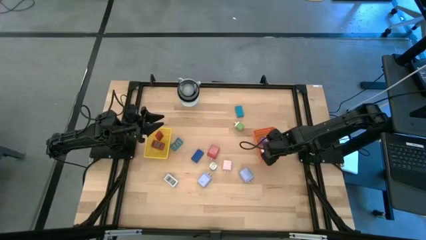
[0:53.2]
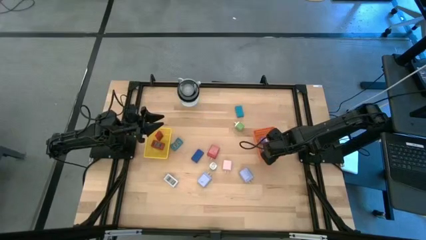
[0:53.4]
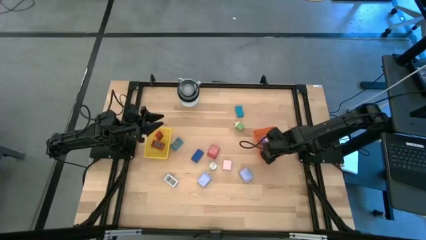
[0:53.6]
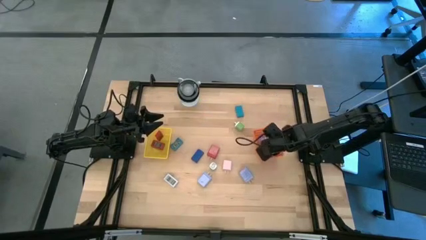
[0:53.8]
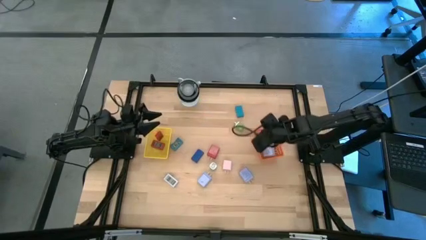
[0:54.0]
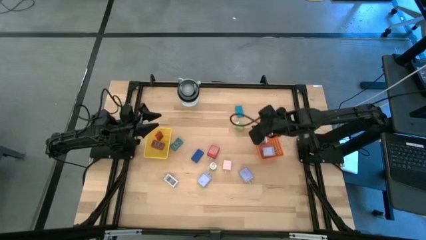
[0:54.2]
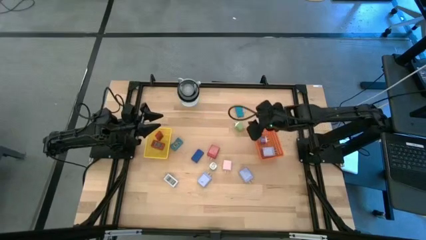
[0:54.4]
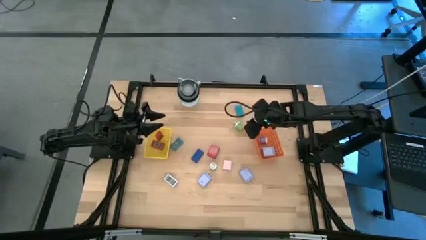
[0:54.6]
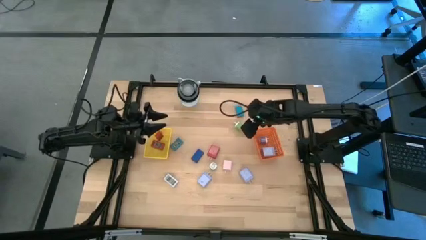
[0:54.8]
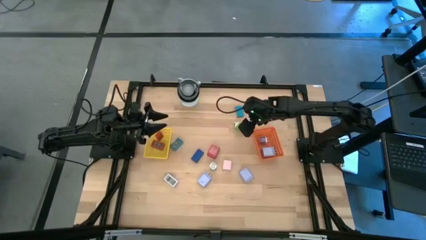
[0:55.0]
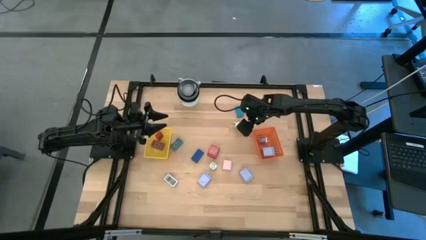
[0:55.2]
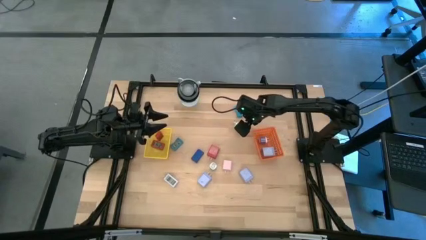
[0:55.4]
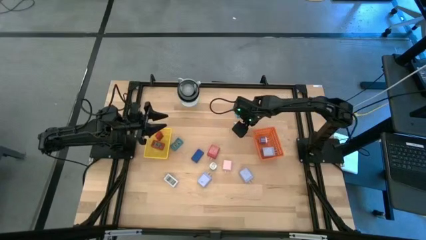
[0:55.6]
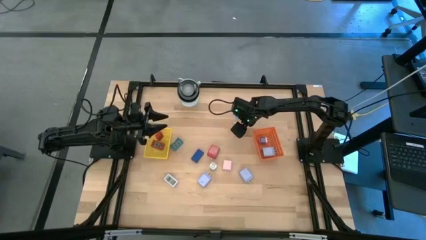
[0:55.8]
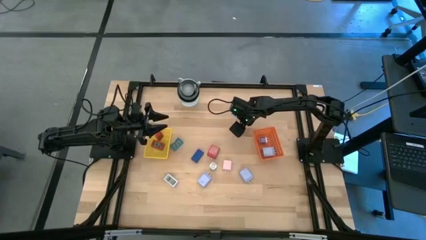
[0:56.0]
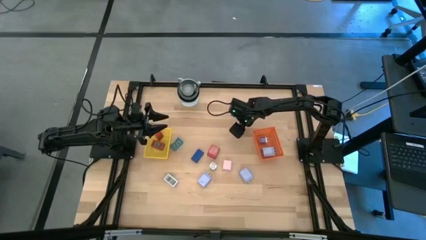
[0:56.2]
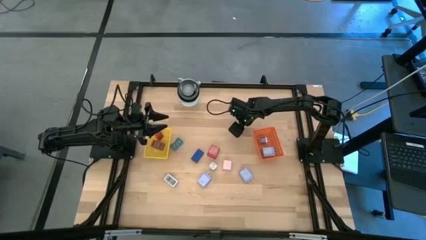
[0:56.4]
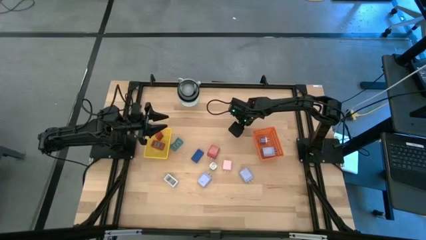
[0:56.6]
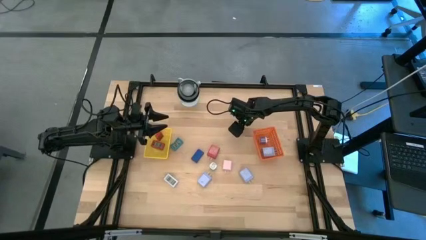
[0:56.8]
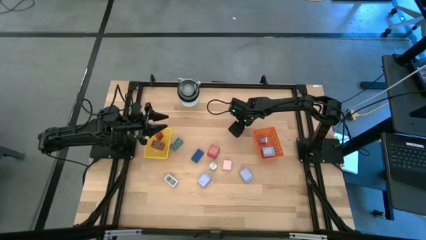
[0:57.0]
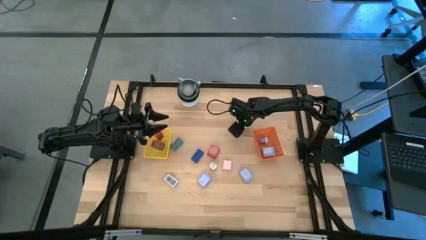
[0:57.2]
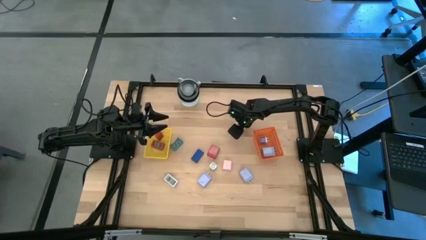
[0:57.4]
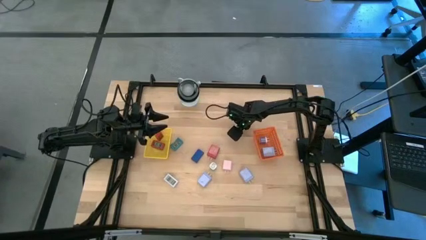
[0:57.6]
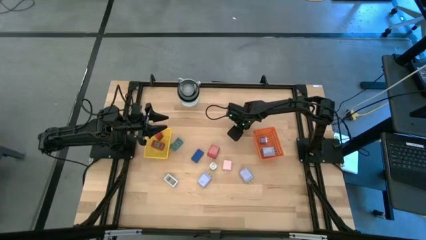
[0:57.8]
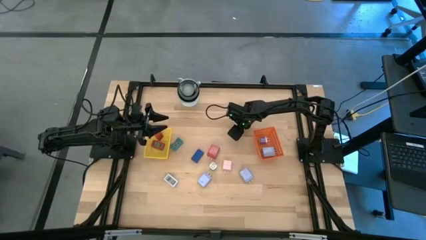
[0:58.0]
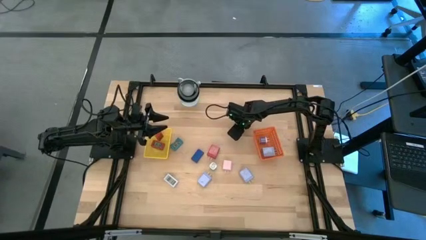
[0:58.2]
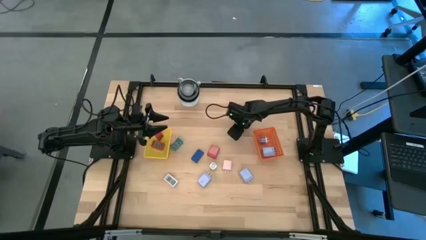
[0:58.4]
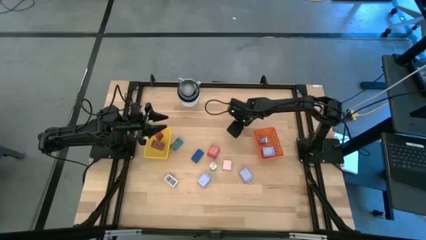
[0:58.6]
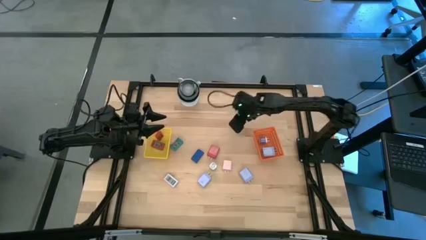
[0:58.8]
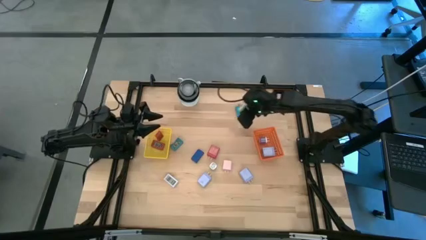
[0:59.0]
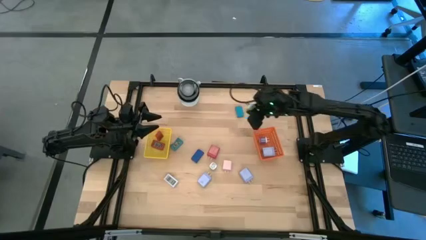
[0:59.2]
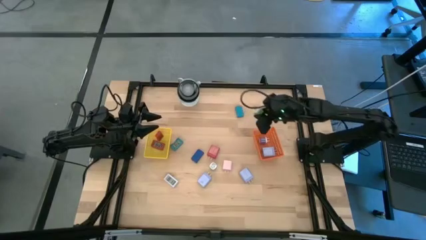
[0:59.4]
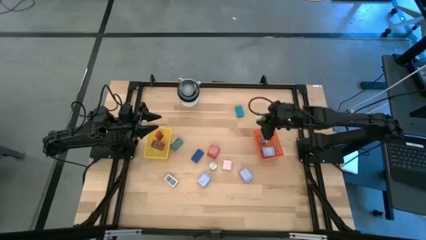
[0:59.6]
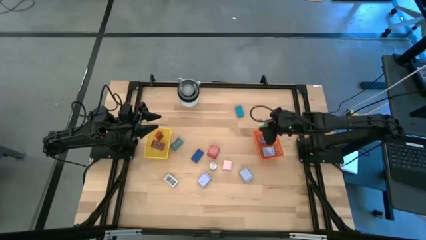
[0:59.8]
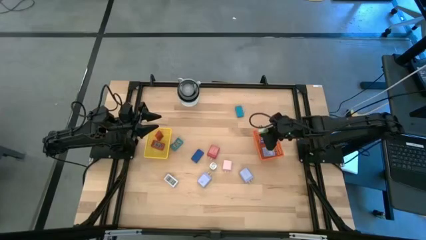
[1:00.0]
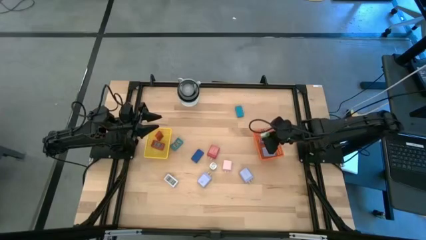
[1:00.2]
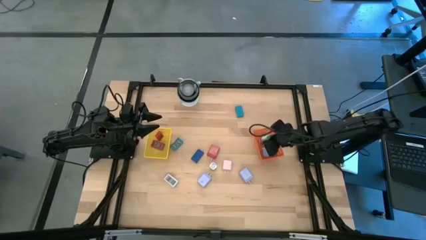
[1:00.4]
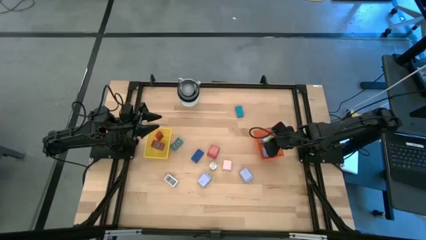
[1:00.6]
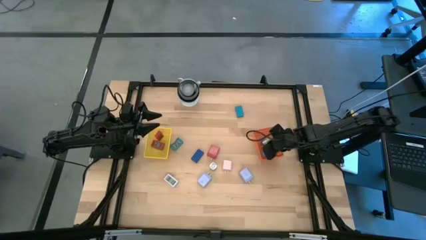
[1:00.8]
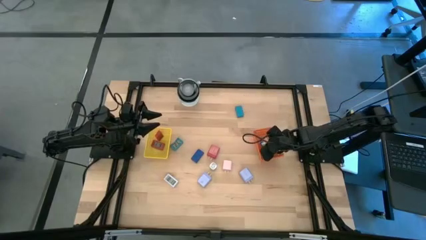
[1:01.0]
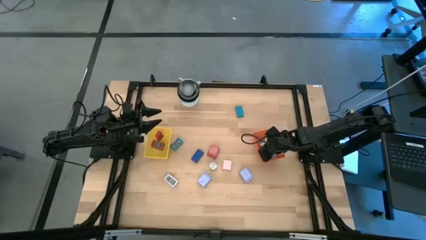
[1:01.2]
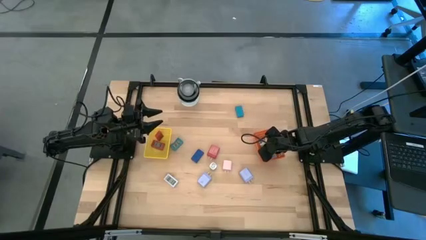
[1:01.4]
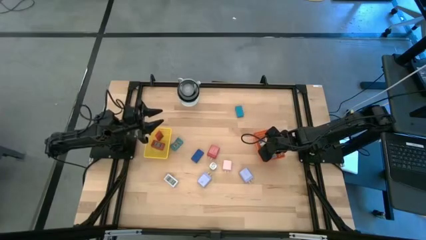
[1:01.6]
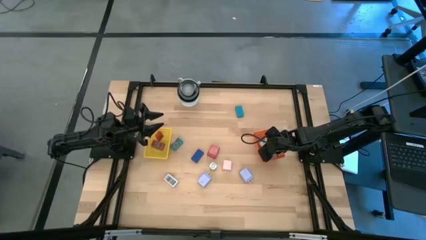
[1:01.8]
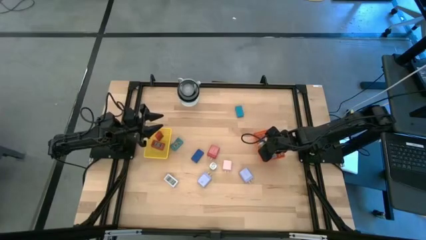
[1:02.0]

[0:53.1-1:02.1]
Task: Pick & Place Office items
Put the top green charger adapter into the orange basket

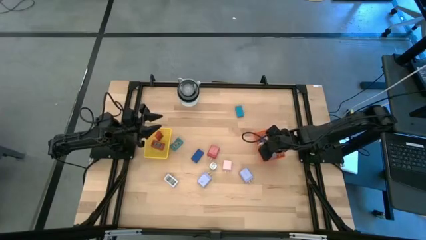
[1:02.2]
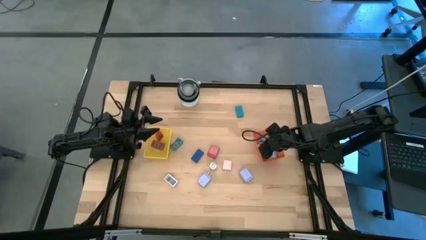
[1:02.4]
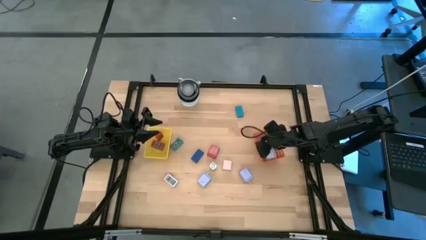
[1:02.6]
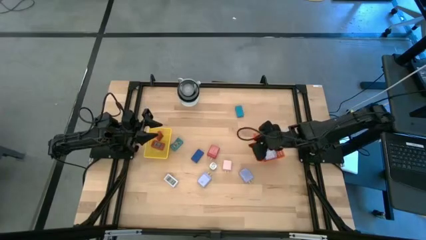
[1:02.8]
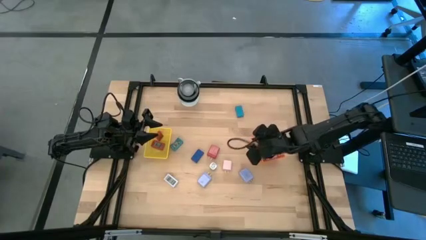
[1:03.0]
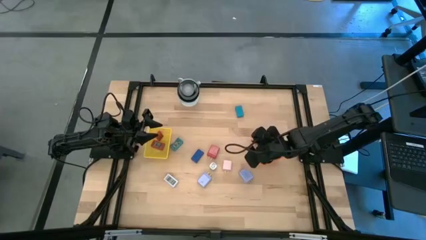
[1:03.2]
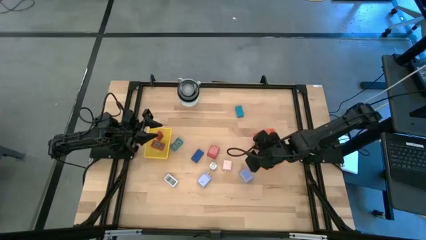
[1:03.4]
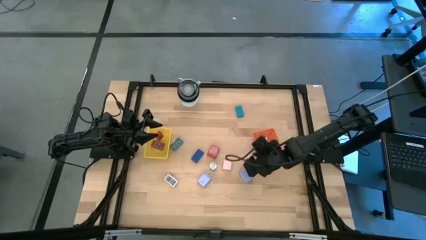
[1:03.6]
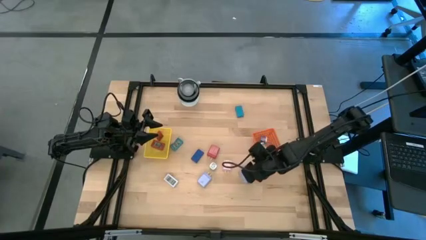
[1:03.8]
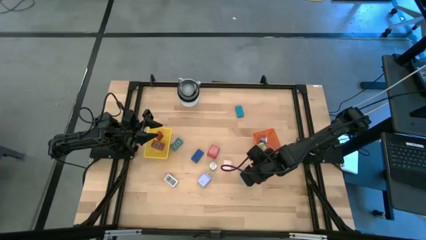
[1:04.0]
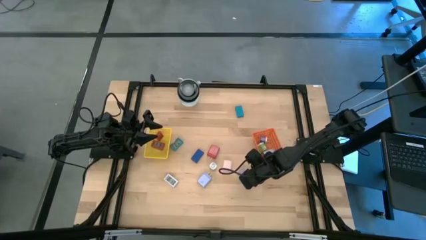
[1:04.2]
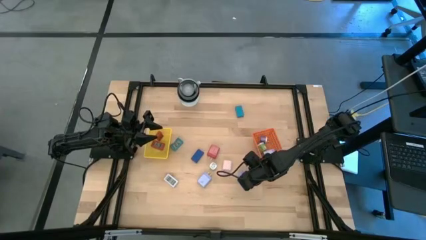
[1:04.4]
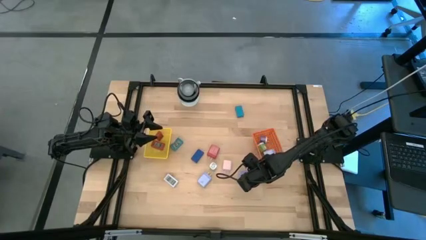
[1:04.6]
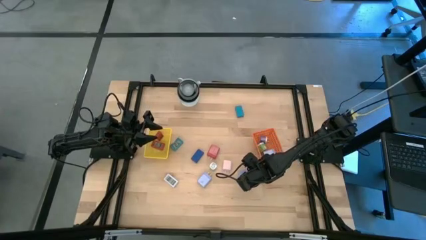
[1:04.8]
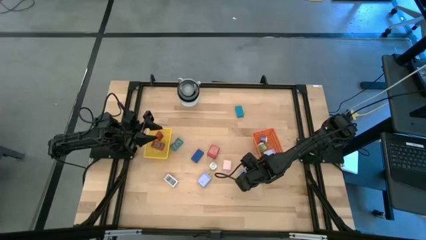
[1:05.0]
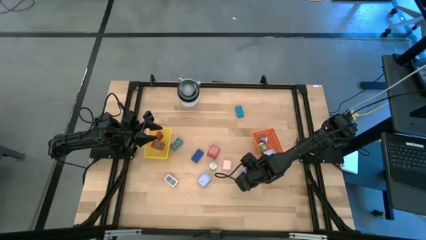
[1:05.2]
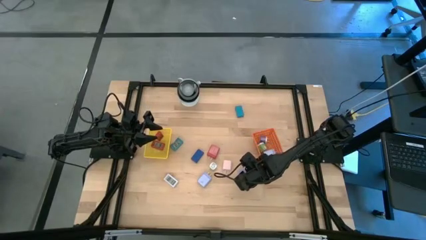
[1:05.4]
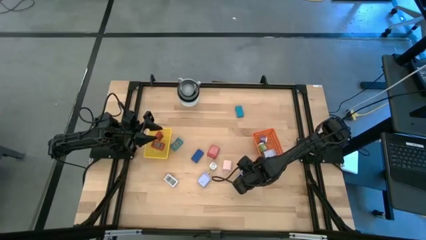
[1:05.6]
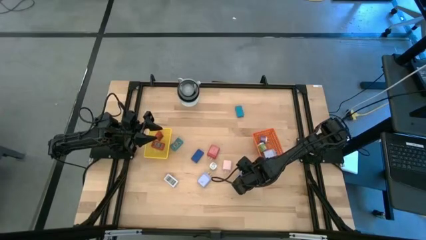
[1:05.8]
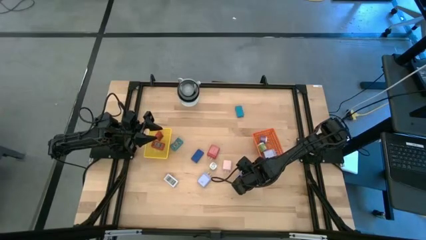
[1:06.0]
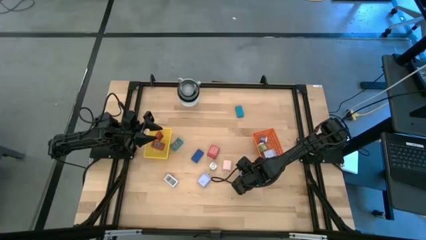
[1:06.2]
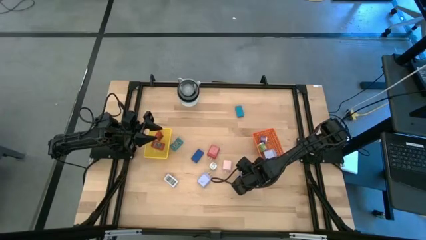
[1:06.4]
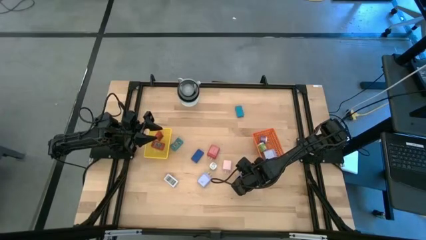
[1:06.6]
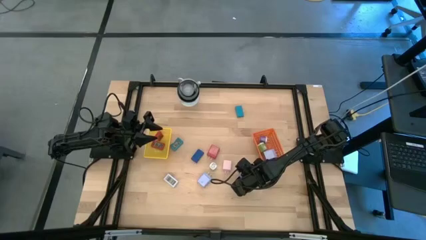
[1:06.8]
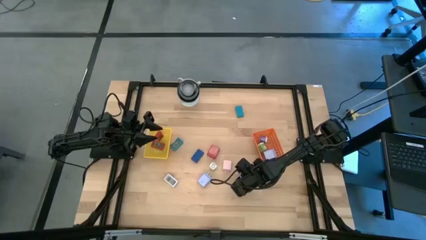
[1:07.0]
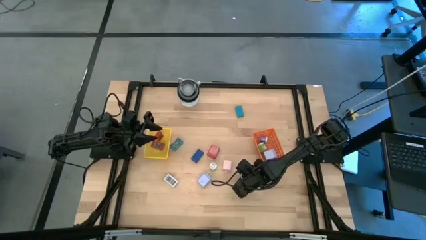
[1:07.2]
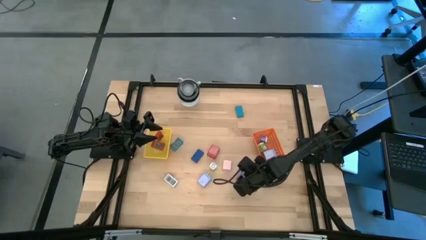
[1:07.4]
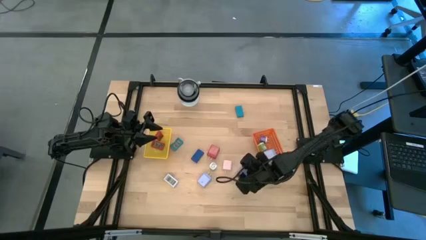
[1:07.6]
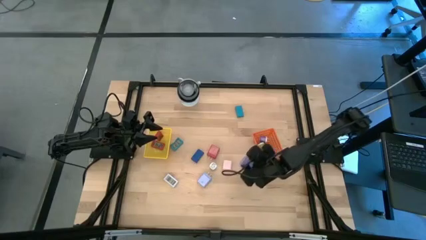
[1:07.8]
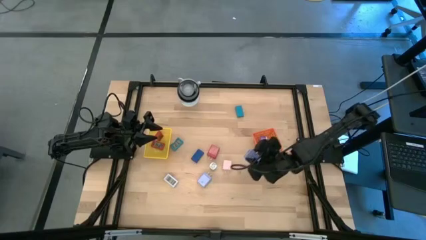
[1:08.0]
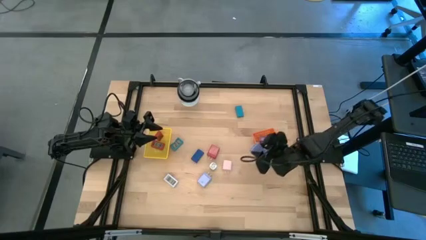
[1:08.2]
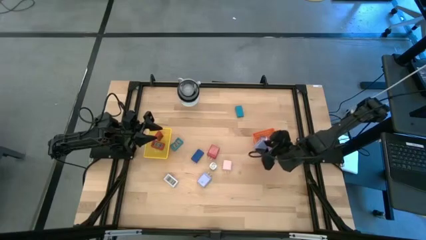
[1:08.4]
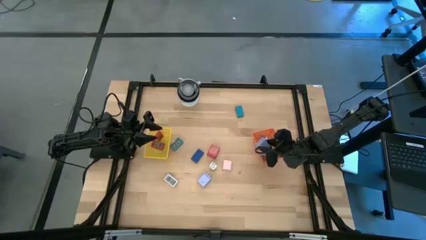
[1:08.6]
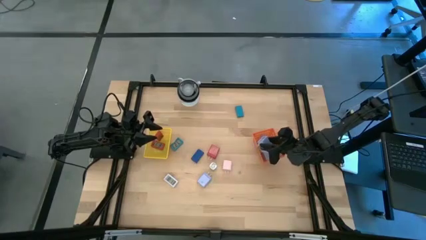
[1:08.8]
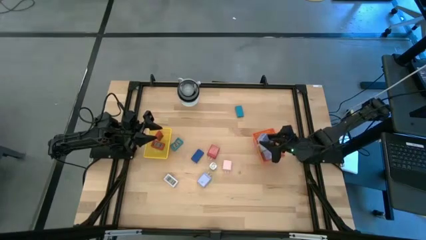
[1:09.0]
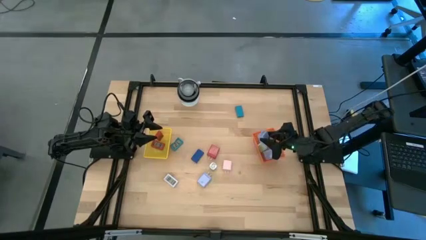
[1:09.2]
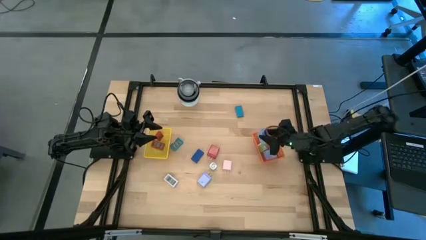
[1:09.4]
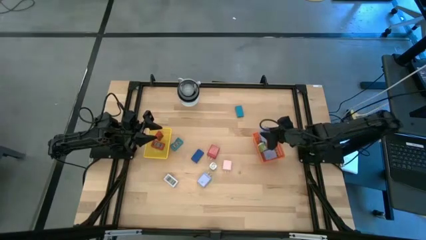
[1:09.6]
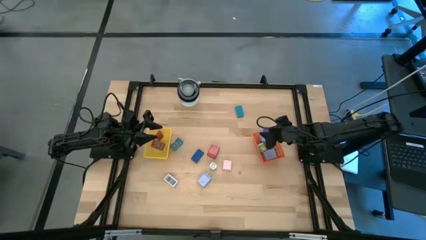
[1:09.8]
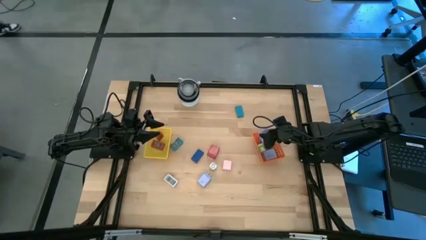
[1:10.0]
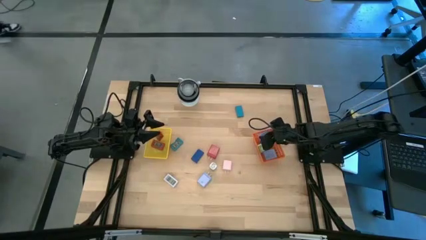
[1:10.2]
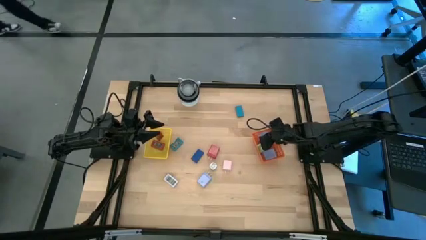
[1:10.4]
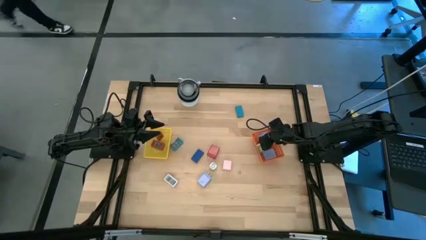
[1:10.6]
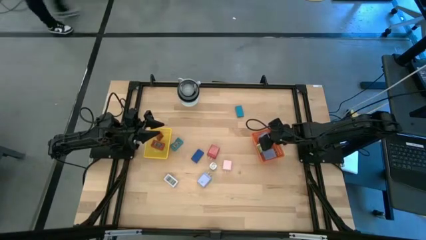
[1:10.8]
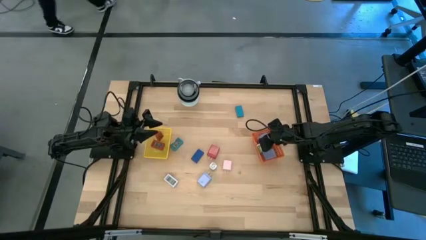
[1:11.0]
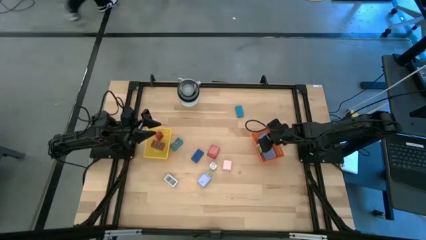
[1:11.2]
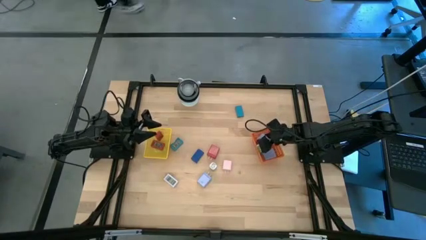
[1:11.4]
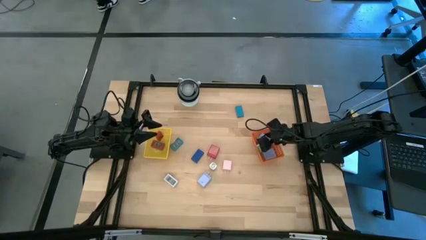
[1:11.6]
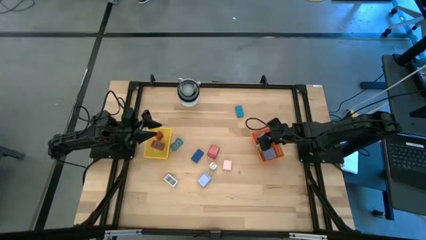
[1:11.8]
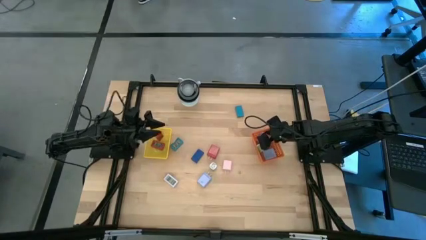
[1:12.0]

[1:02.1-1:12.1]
Put the right light purple charger adapter into the orange basket
